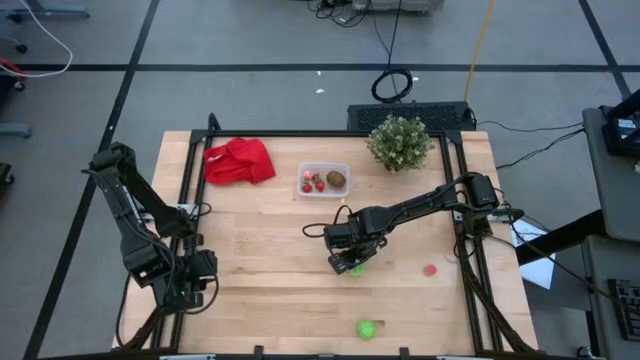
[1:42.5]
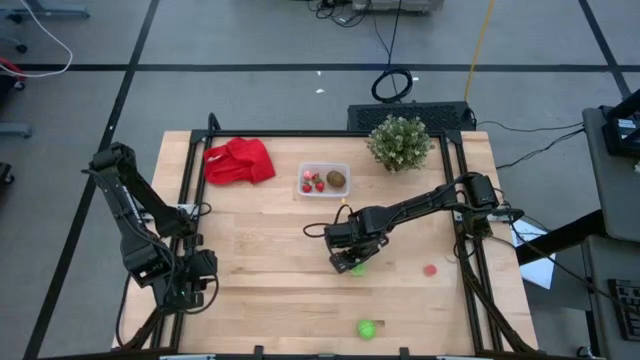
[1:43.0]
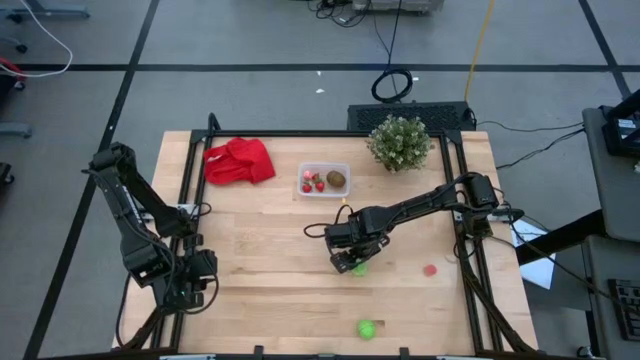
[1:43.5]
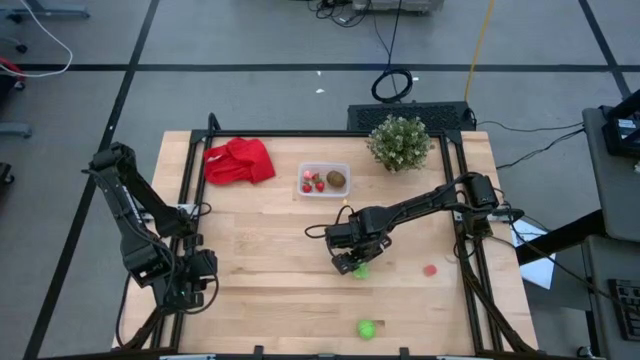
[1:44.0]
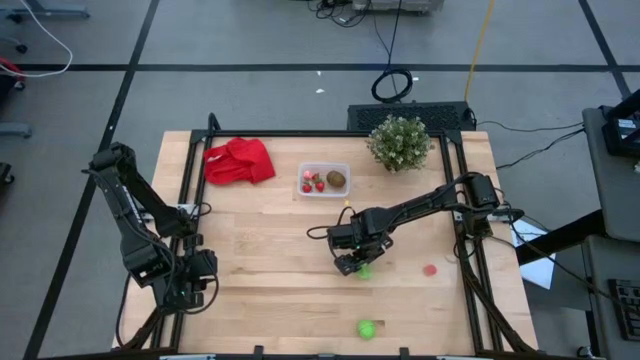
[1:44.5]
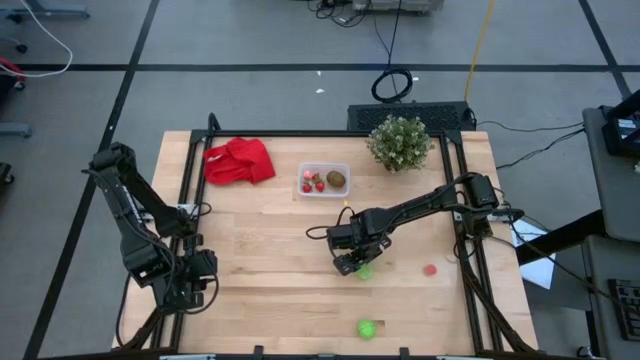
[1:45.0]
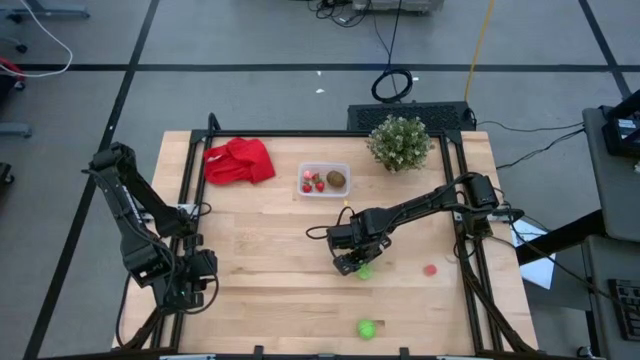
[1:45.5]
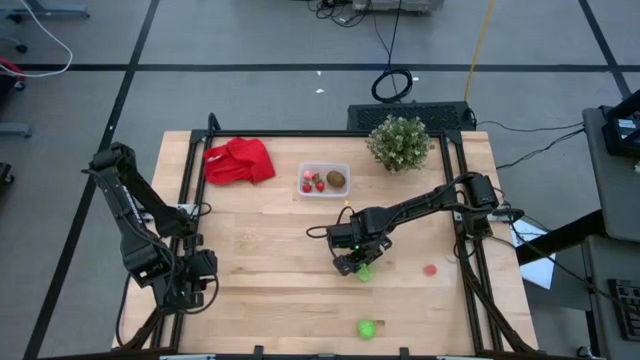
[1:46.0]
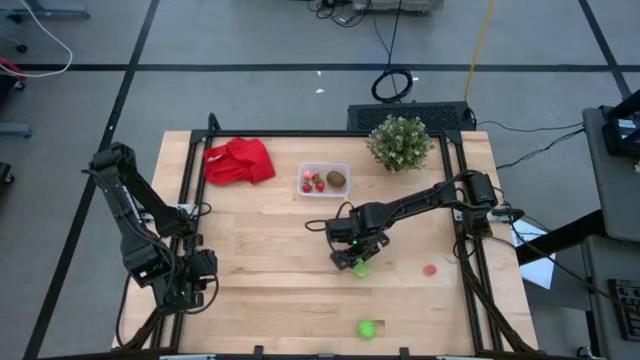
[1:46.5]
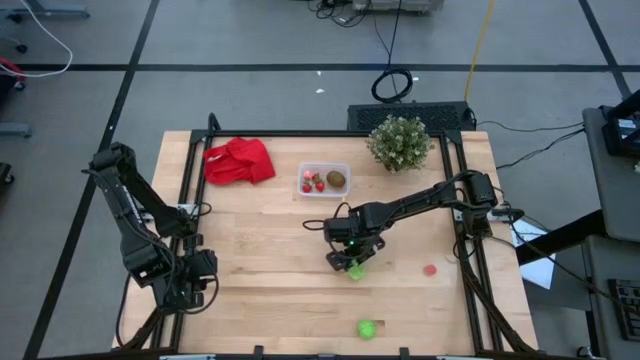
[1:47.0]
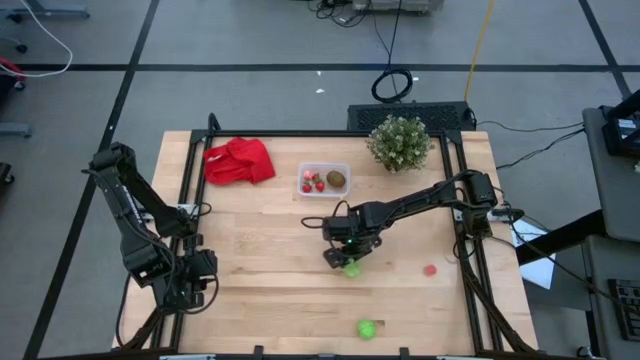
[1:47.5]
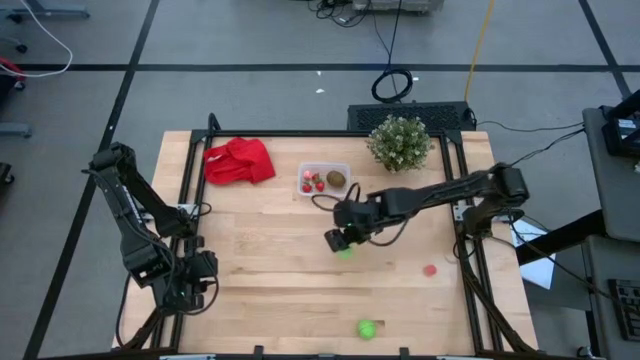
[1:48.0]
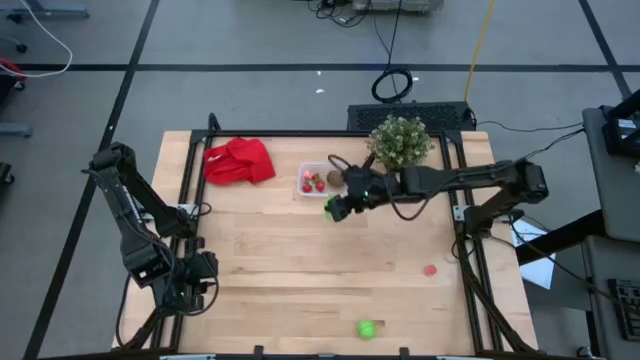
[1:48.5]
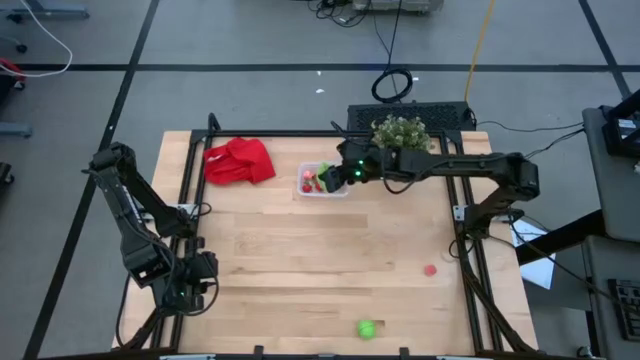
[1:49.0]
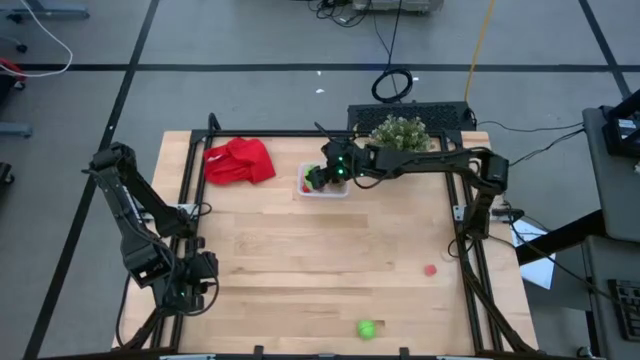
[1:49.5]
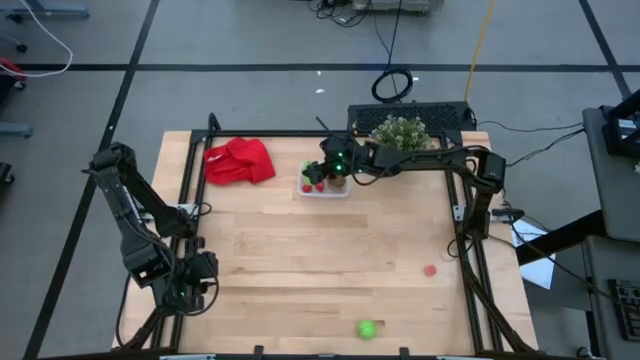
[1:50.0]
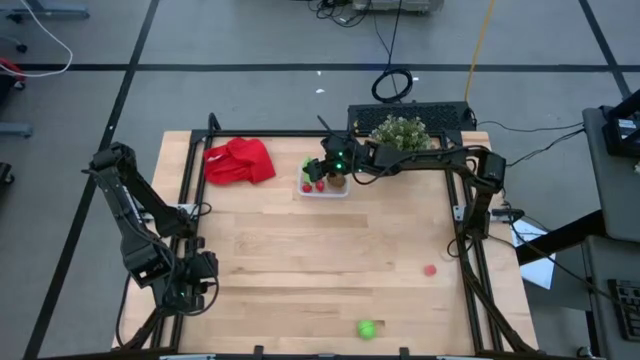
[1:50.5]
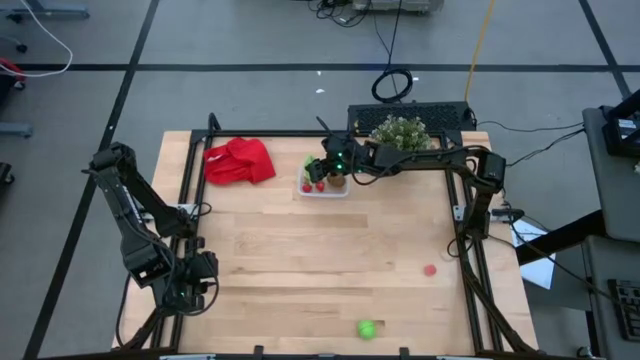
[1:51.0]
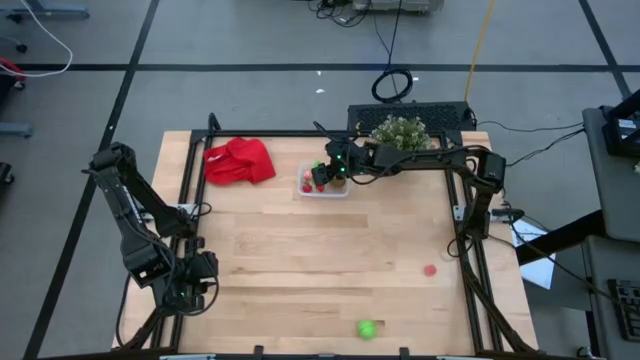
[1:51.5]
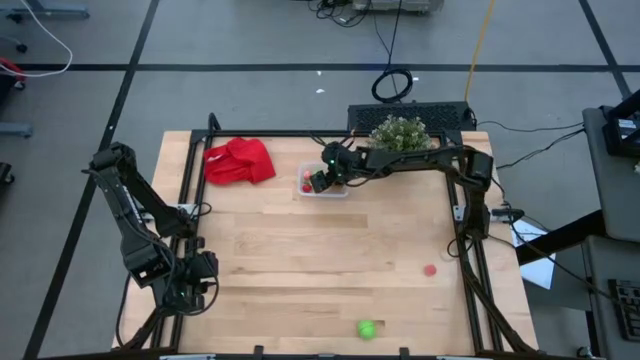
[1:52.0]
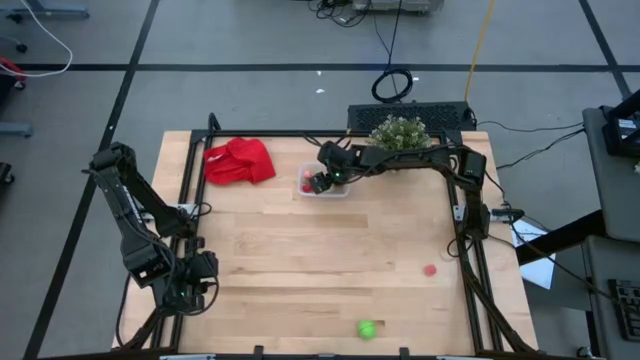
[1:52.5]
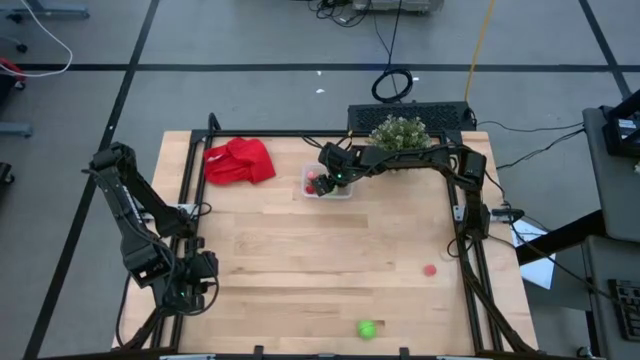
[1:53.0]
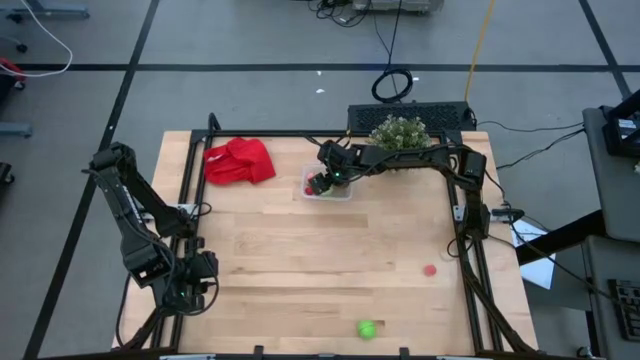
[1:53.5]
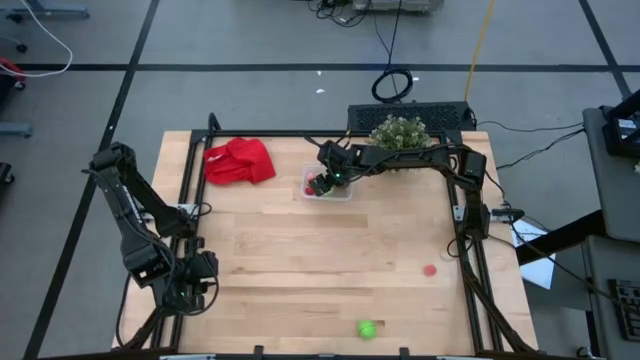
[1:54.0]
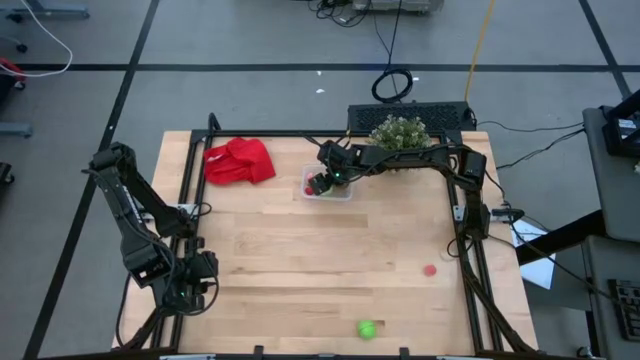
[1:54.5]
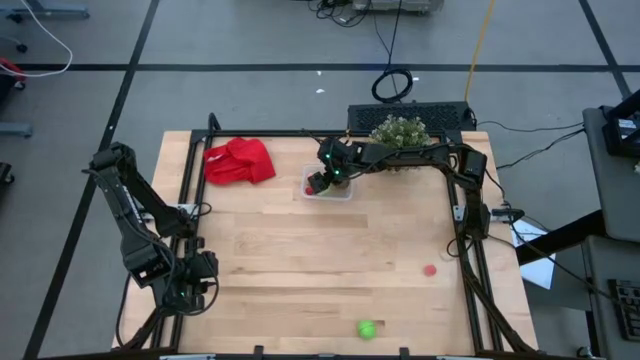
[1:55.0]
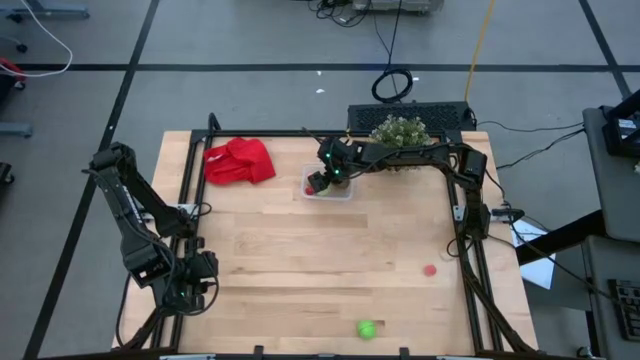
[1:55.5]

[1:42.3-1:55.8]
Task: Pick and placing Produce into tupperware
Put the starfruit into the bin

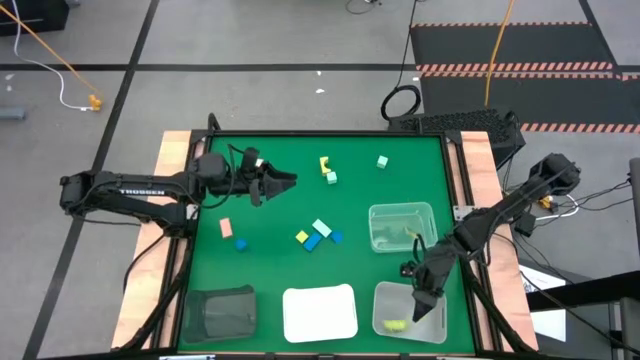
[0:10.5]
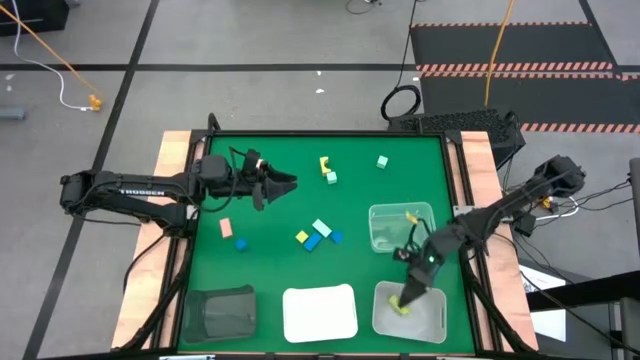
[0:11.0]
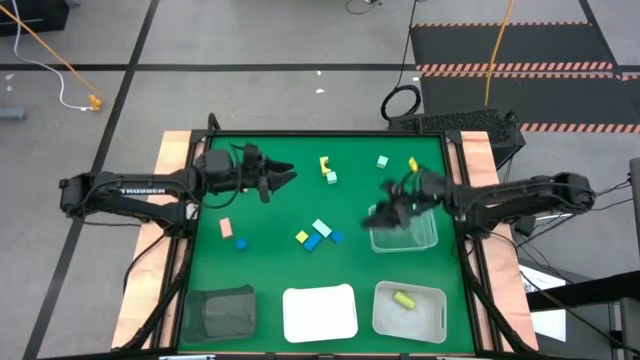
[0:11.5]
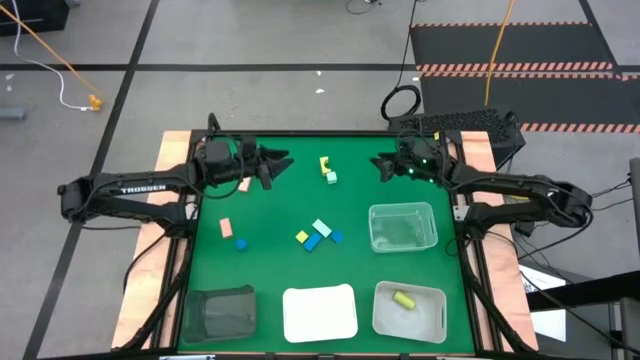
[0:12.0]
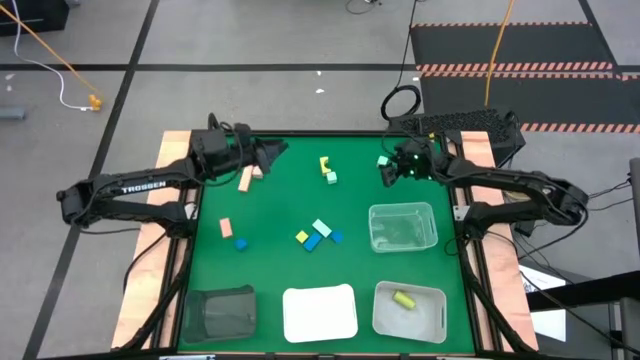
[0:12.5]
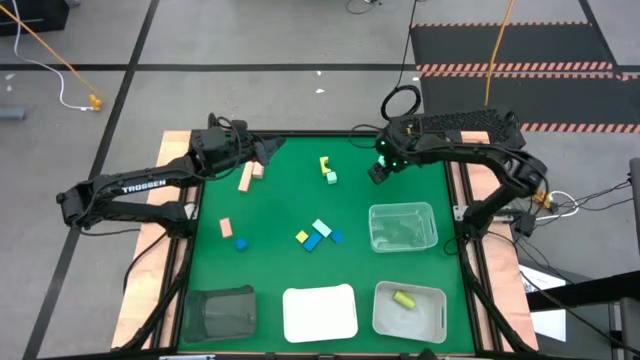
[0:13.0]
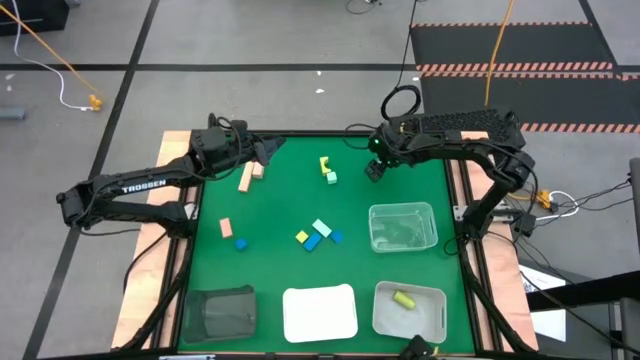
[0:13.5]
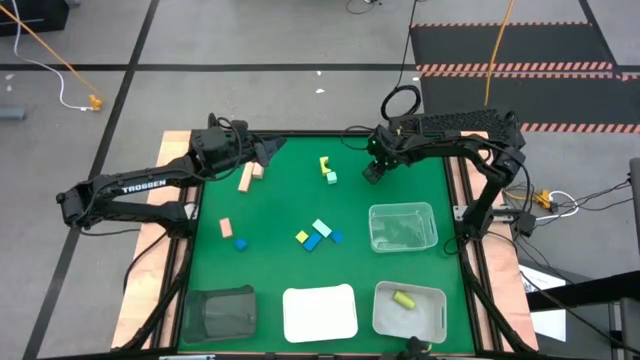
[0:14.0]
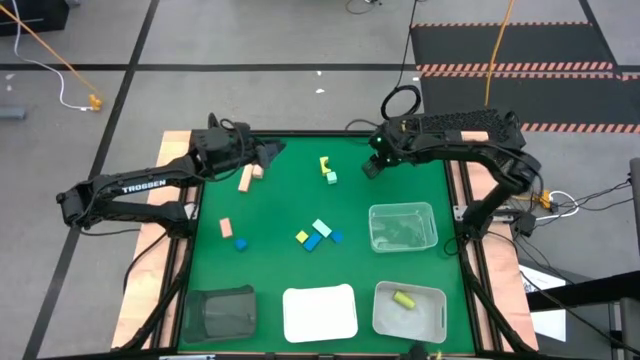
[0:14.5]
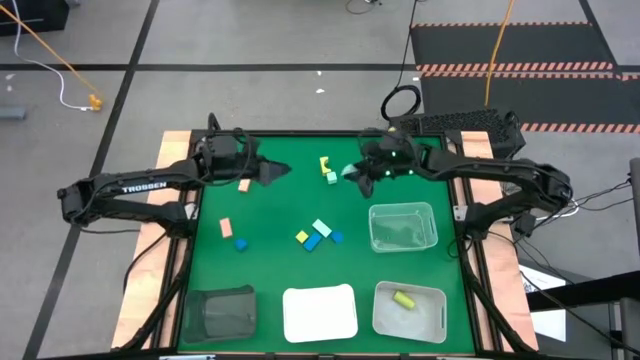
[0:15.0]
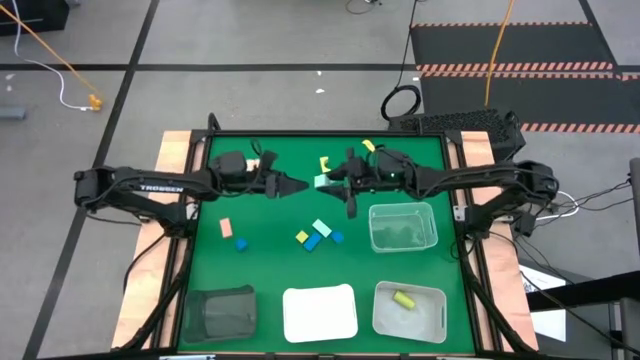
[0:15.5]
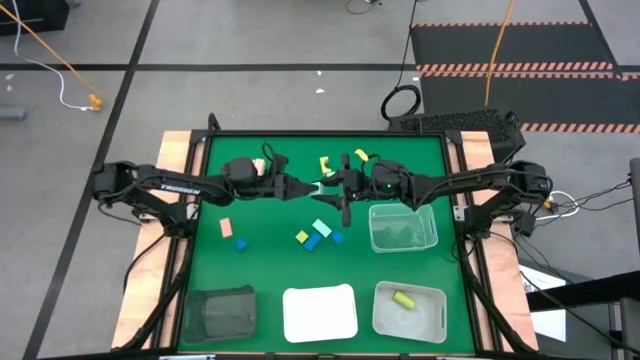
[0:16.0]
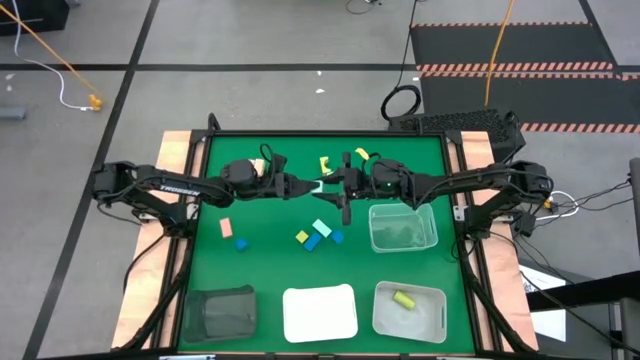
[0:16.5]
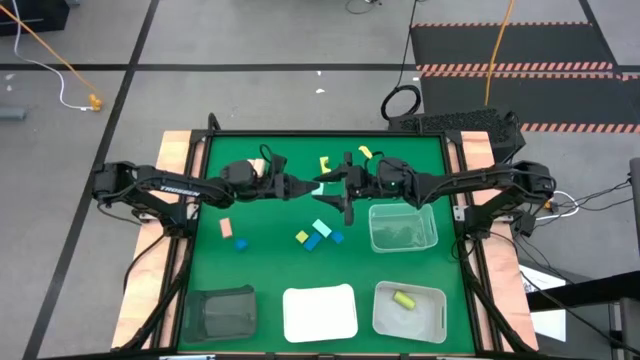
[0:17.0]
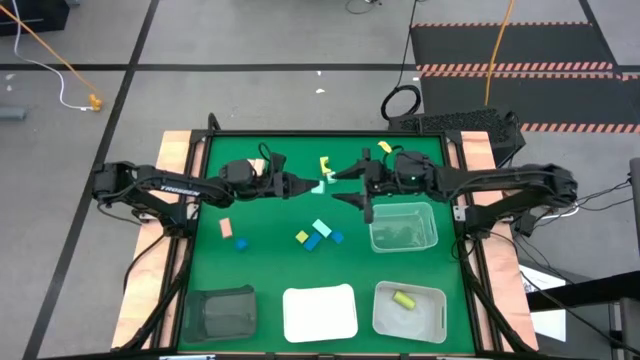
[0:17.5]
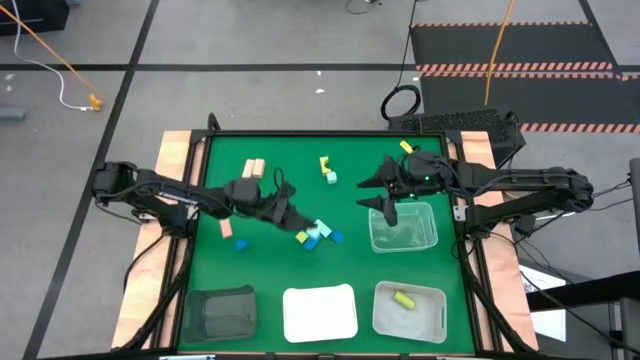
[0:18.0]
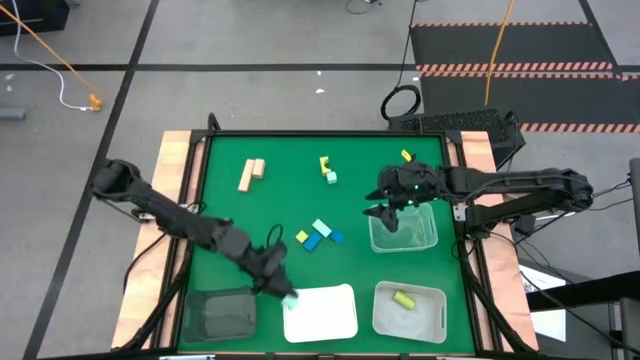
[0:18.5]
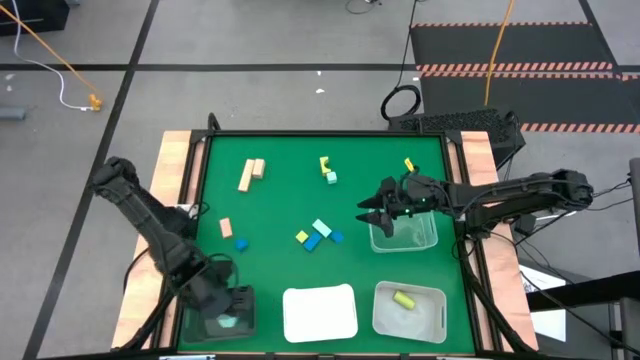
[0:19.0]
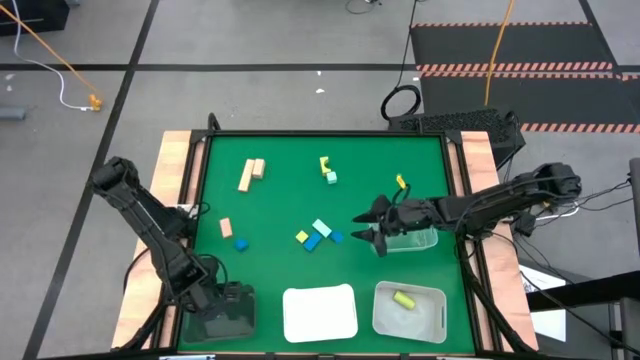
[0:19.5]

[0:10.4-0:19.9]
Task: Sort & place blocks by color
Put the top right light blue block into the black bin
